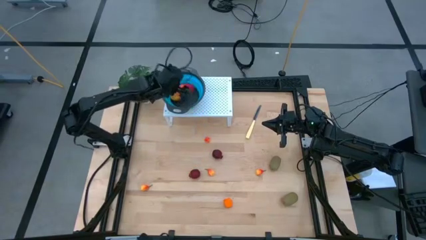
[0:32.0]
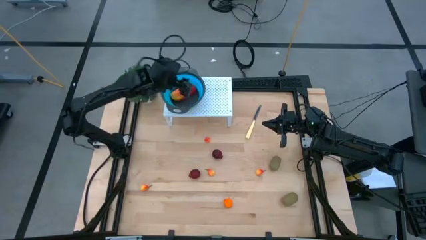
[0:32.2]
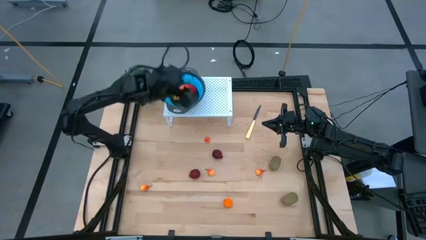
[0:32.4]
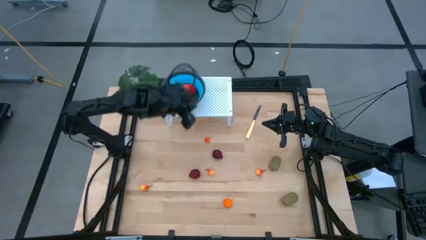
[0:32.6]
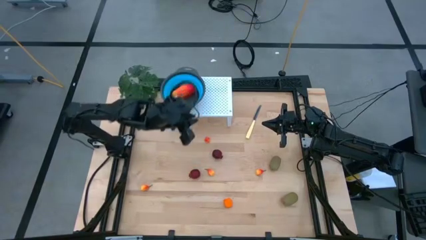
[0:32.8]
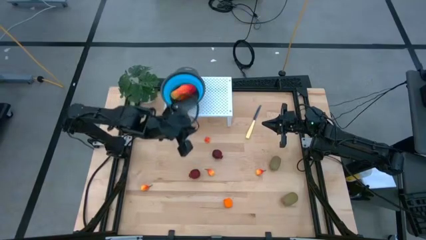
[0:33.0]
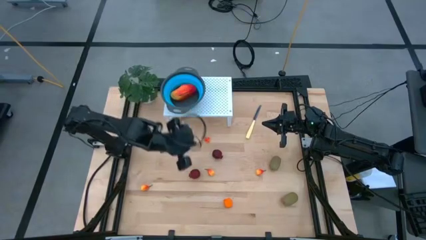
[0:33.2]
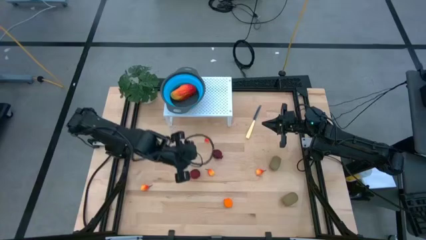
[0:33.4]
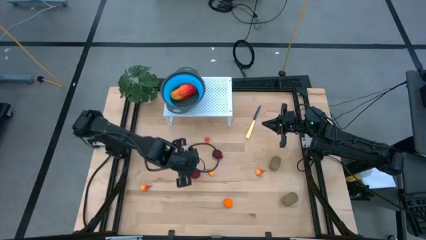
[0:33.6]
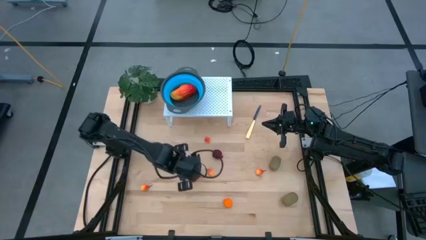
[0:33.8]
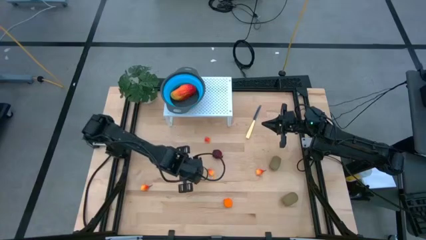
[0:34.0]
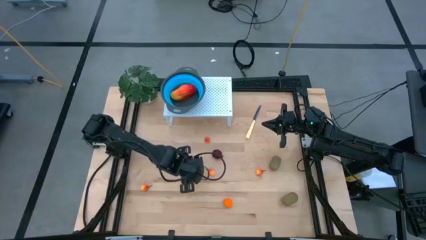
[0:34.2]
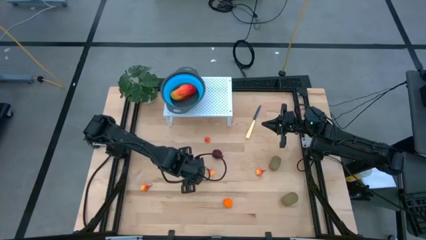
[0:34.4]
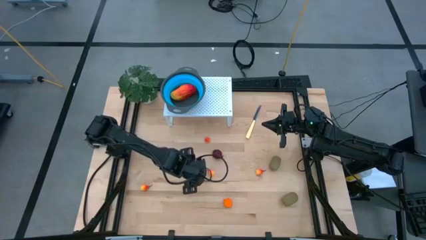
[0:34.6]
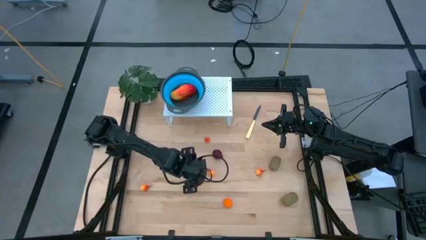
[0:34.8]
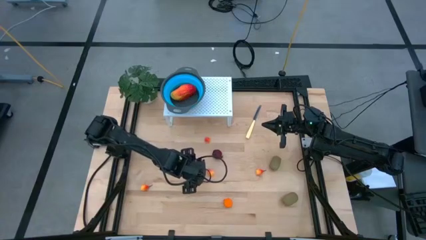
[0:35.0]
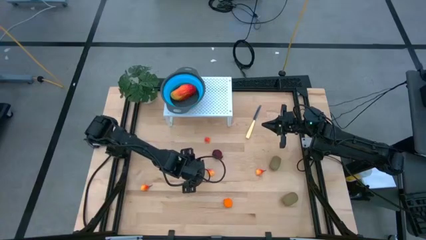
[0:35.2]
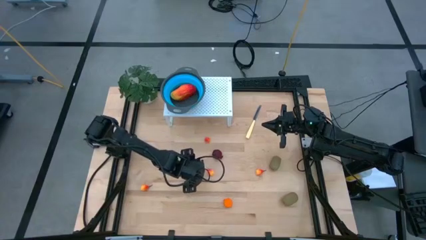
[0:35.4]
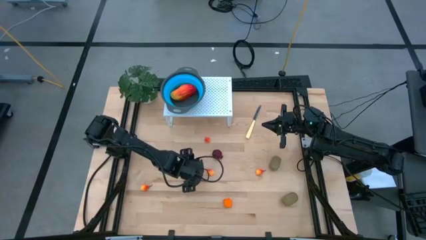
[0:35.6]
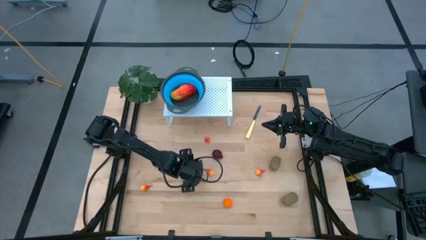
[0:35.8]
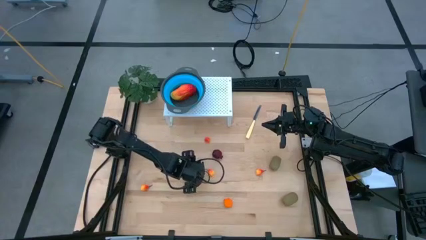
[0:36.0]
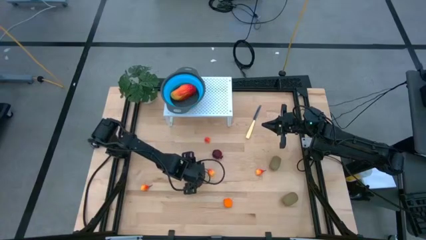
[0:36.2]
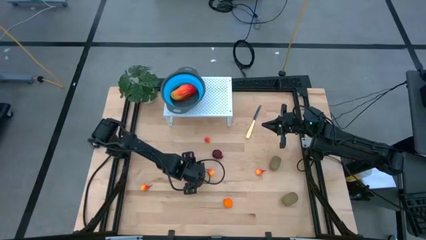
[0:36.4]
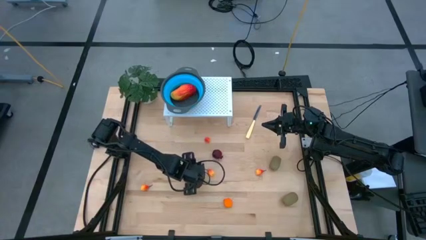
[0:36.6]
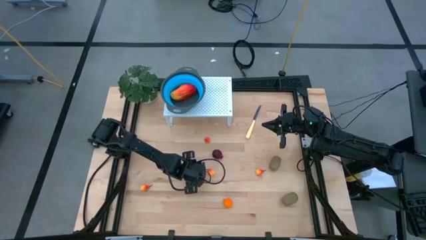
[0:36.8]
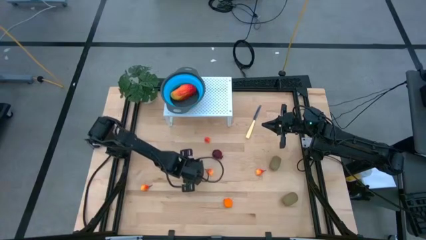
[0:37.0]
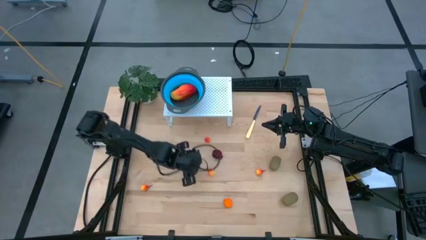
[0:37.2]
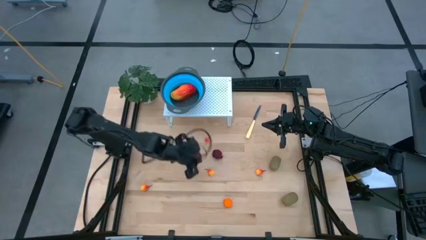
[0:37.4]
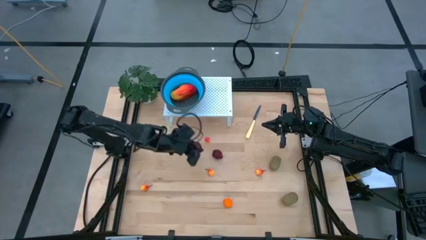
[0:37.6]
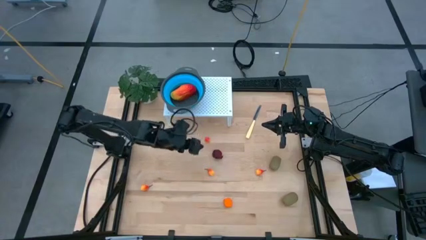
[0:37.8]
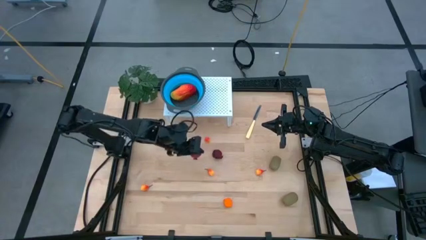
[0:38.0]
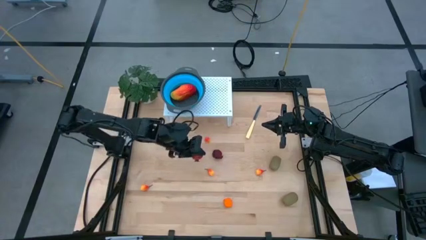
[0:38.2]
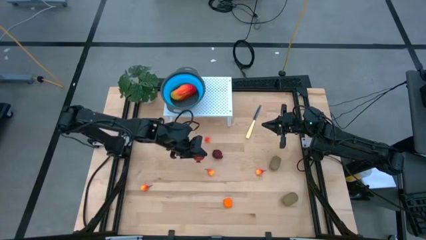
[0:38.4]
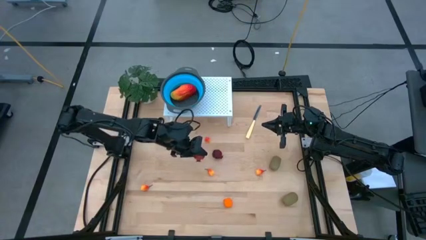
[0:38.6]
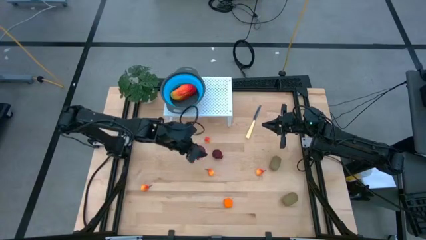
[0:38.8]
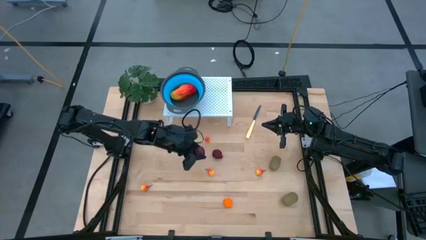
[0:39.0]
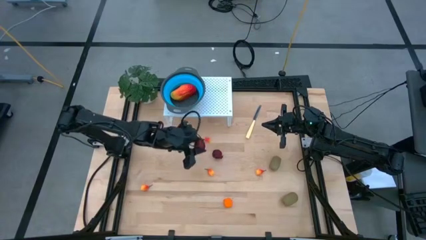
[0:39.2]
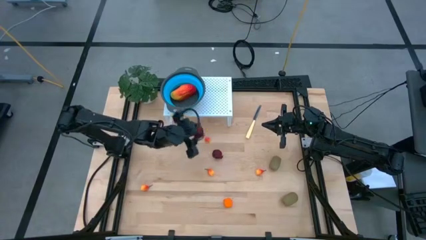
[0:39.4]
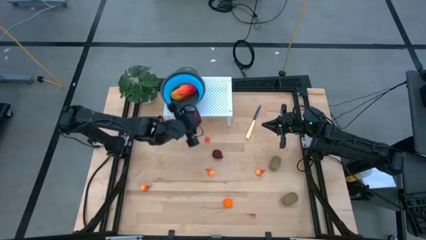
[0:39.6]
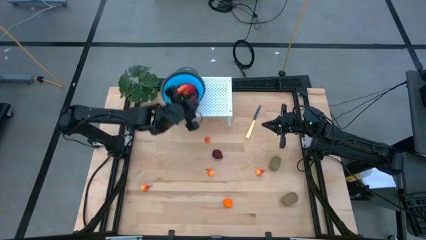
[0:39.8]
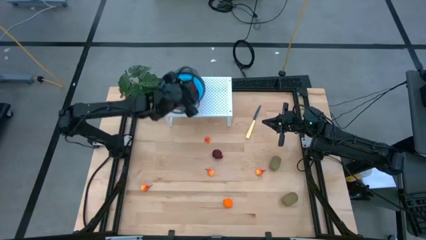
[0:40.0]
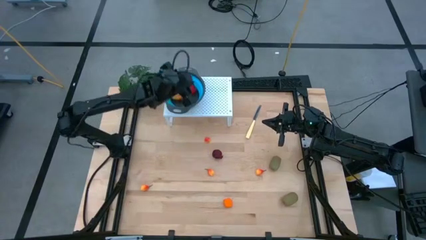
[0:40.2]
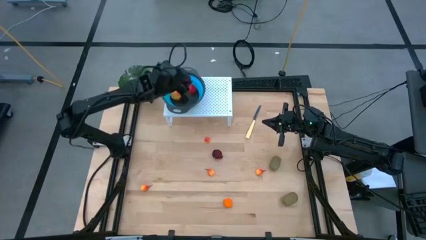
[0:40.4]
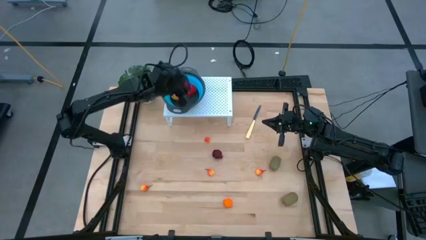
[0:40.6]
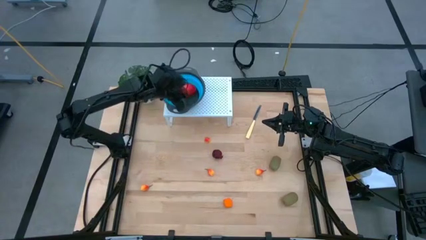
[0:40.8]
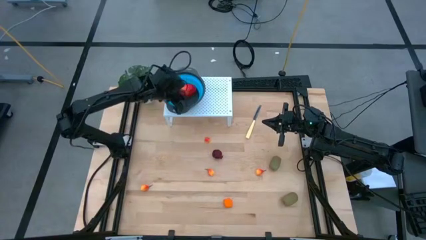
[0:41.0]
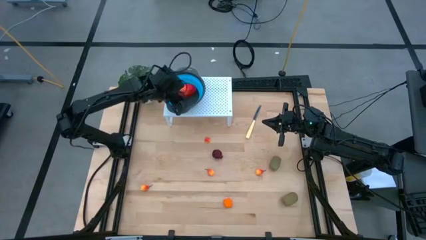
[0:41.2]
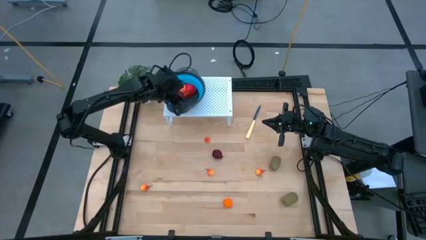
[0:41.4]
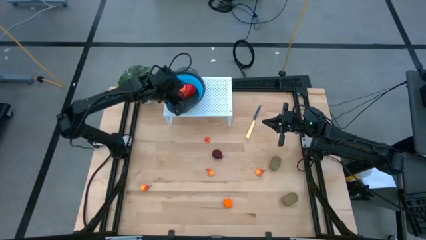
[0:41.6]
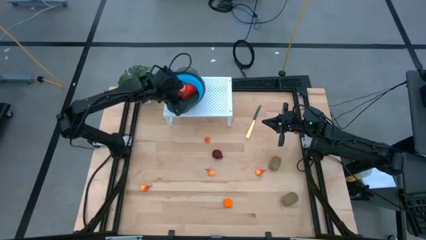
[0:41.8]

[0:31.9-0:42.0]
Task: Pick & Place Fruit
Put the pomegranate into the strainer bowl on the shelf

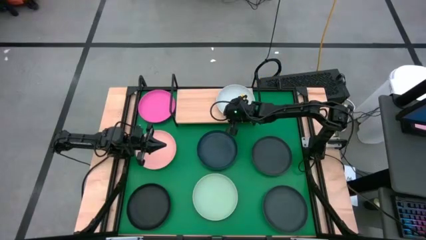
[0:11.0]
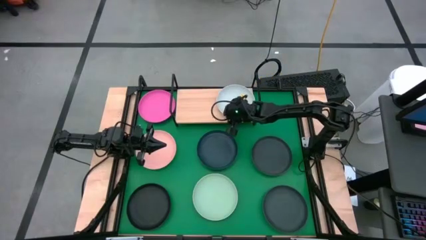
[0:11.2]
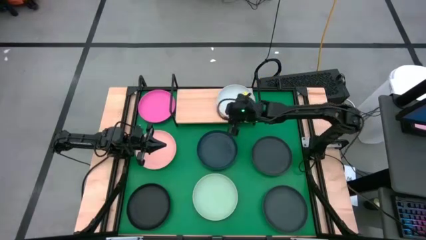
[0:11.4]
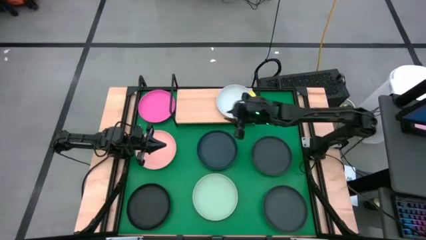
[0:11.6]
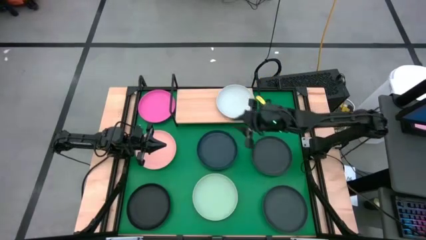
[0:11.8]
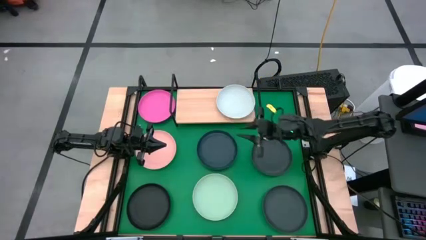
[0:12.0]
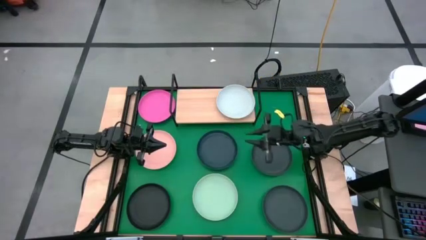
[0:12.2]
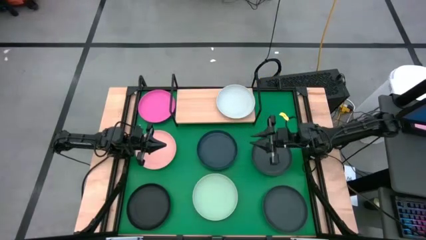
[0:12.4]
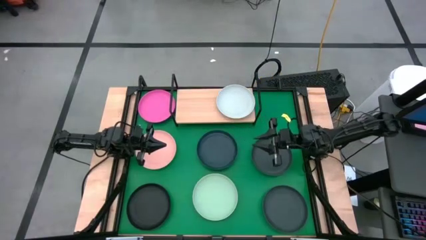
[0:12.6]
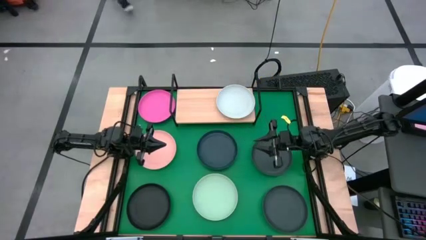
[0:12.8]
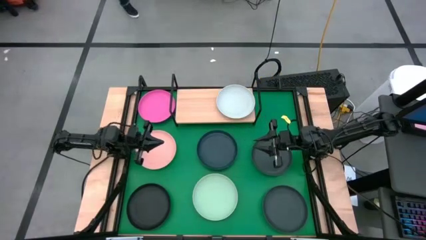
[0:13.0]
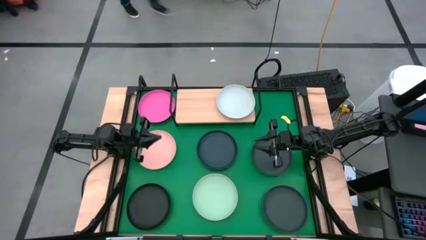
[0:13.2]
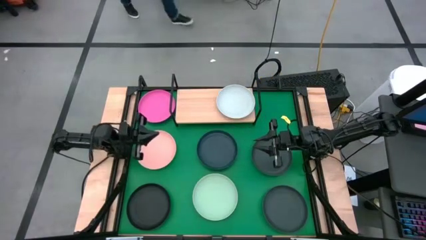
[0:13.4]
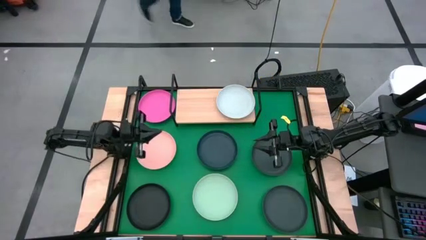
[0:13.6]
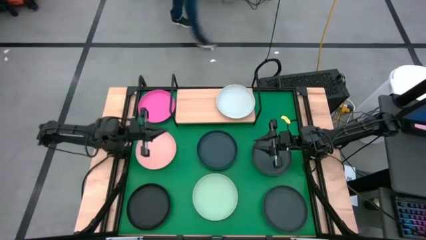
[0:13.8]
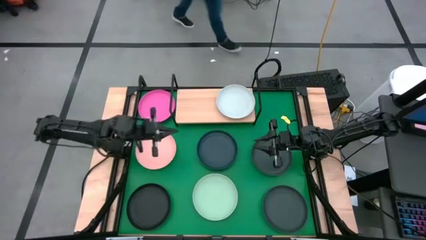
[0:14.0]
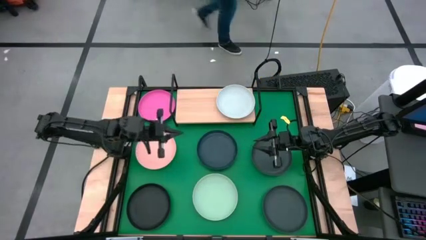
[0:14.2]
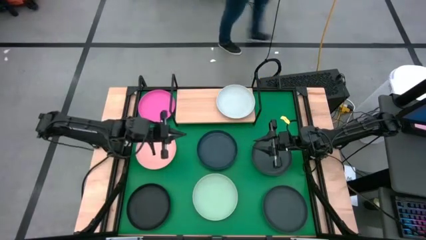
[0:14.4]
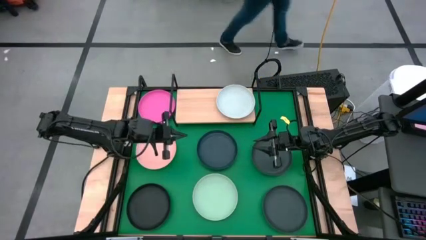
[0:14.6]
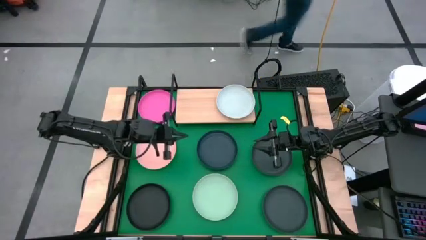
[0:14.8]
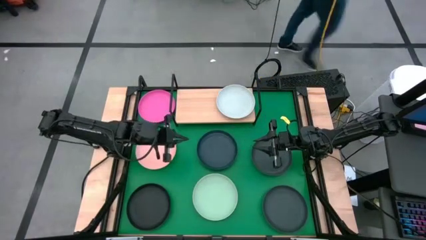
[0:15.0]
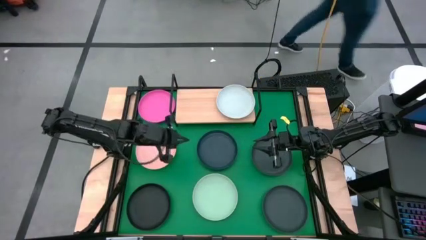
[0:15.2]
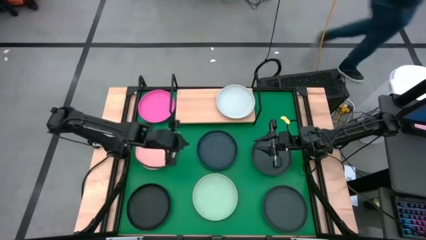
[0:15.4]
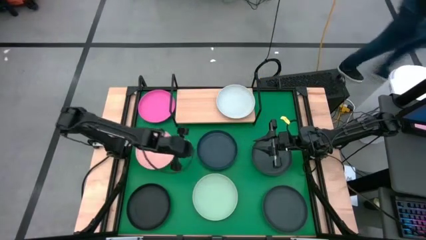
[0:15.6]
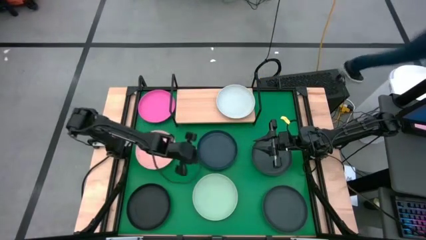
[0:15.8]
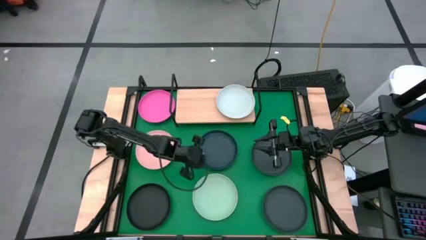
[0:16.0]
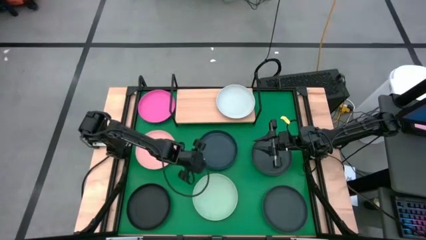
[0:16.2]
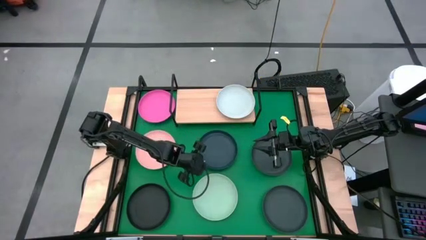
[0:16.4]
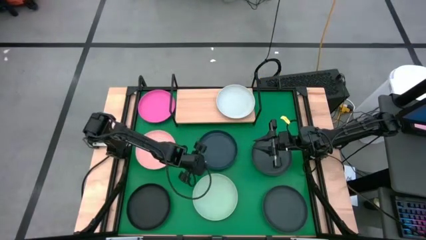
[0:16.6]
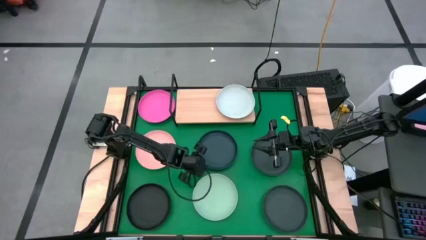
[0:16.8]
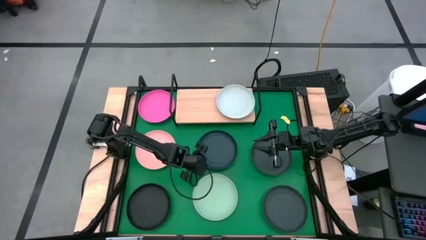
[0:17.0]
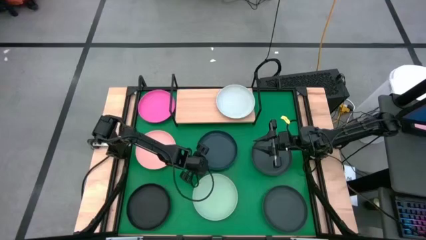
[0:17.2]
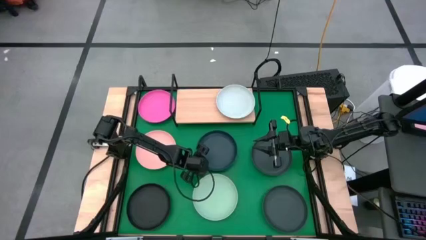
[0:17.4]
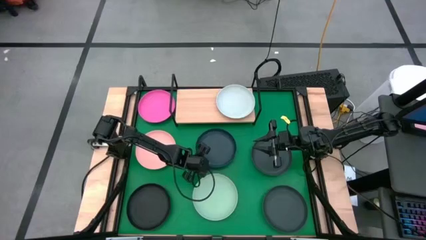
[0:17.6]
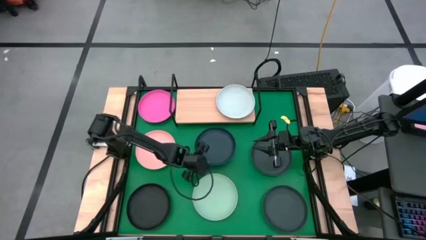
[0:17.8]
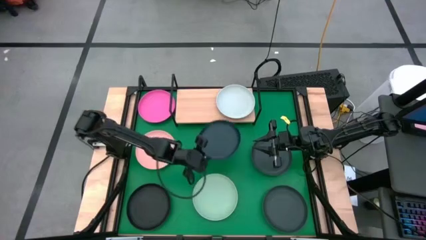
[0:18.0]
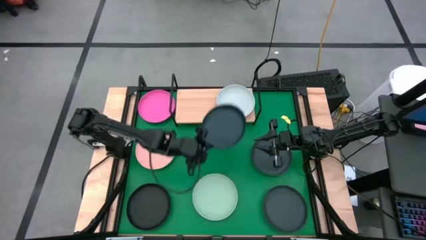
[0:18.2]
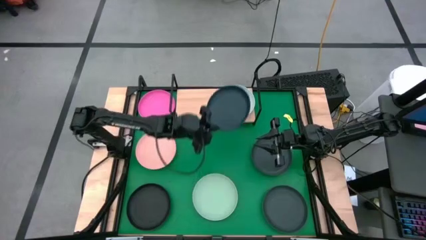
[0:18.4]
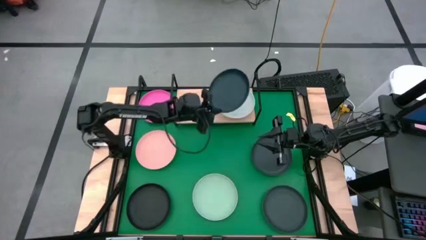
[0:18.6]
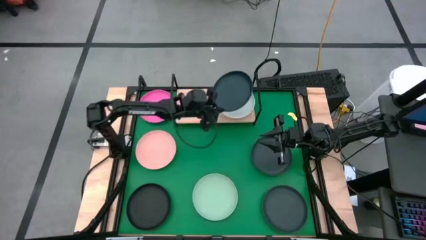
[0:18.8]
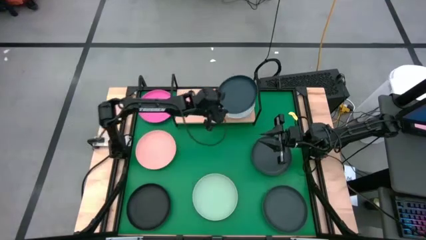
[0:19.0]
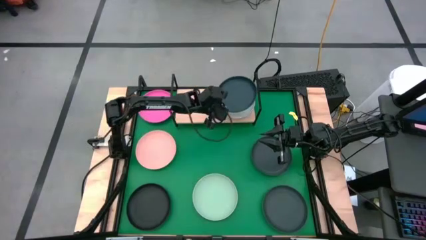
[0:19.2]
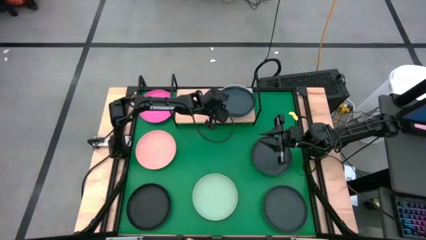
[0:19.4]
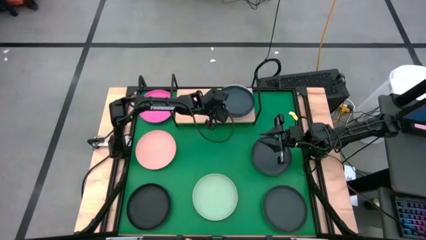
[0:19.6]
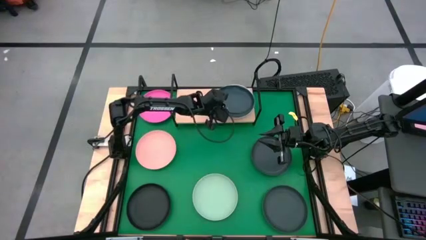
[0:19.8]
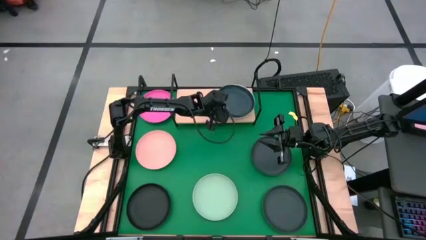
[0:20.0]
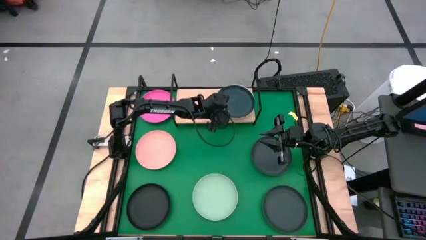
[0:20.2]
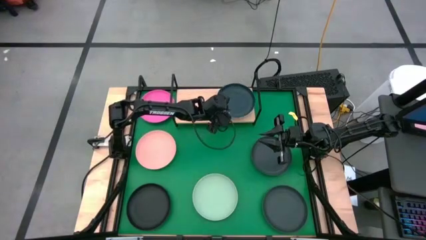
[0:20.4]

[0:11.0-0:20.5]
Task: Place and stack plates onto a shelf
Stack the dark blue plate on top of the white plate on the shelf
